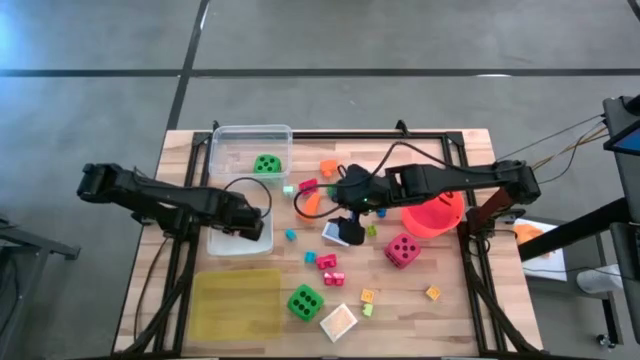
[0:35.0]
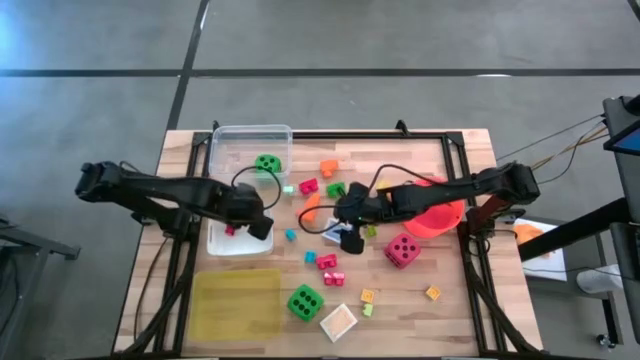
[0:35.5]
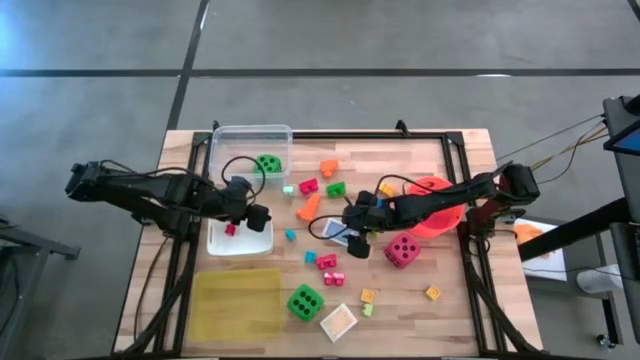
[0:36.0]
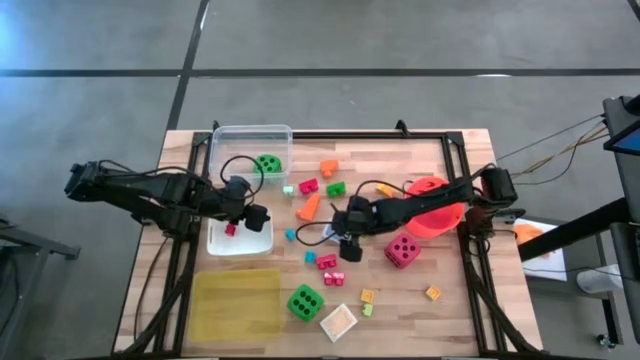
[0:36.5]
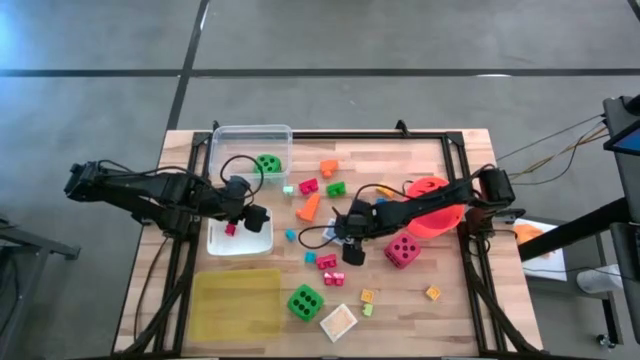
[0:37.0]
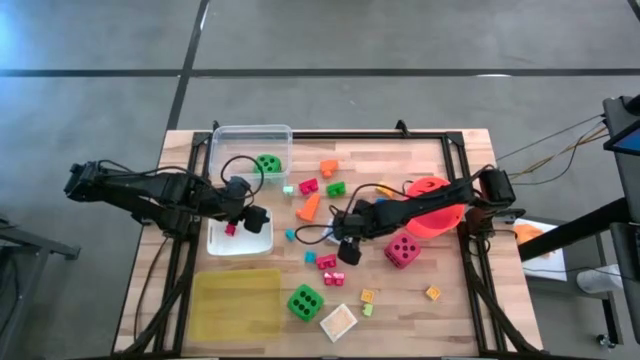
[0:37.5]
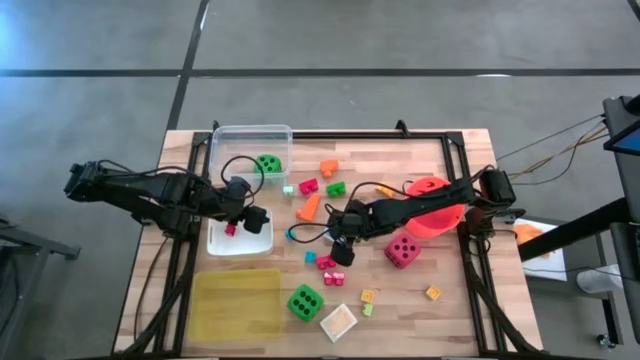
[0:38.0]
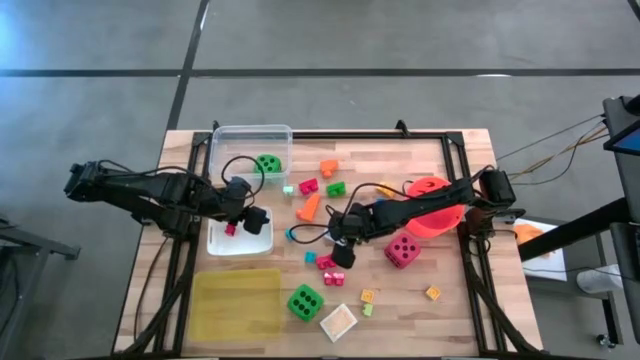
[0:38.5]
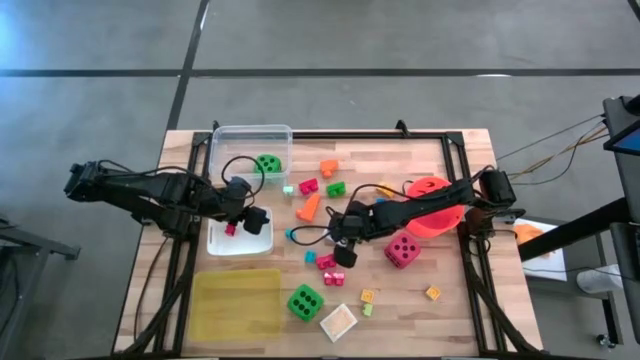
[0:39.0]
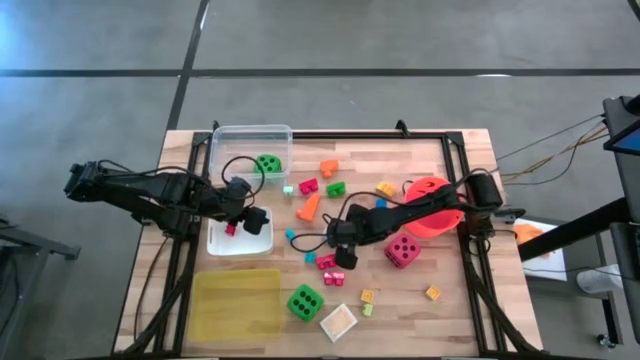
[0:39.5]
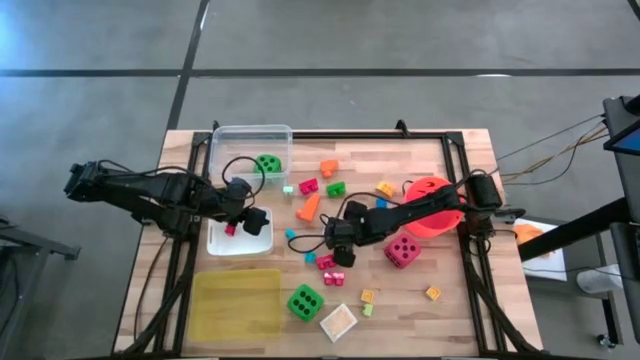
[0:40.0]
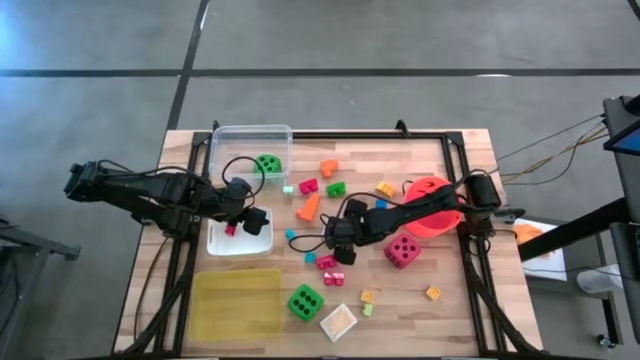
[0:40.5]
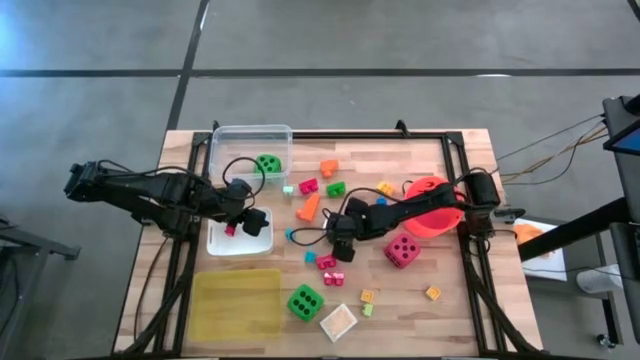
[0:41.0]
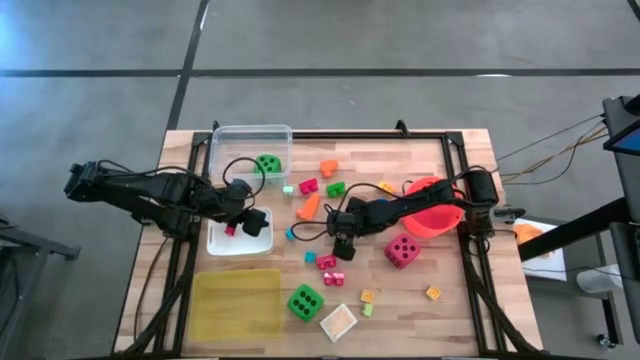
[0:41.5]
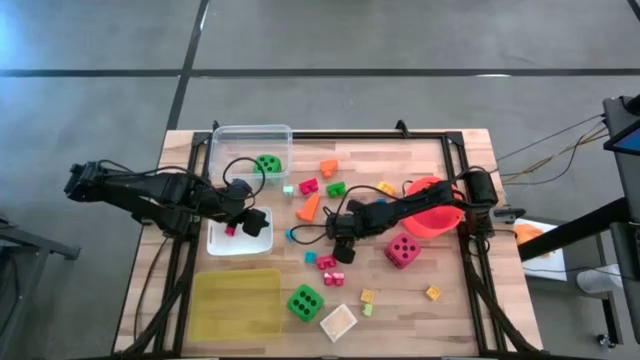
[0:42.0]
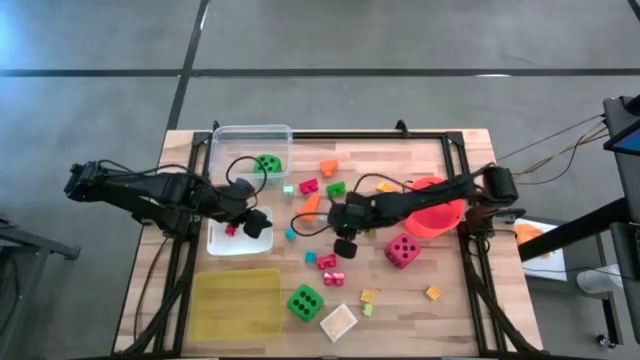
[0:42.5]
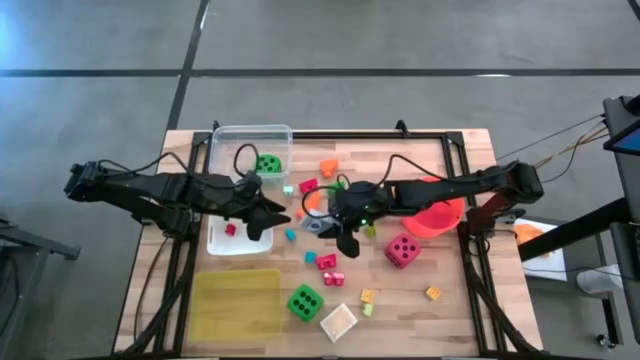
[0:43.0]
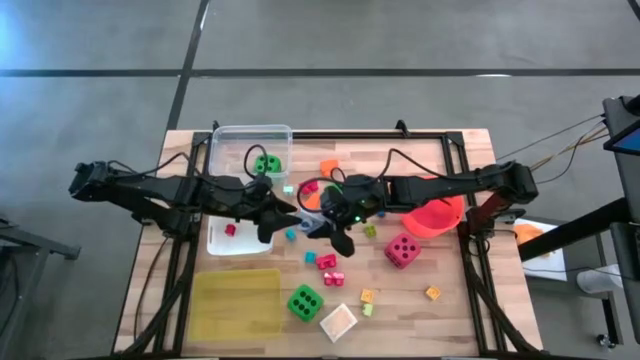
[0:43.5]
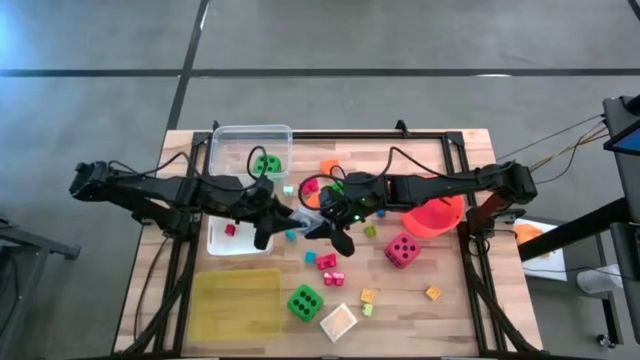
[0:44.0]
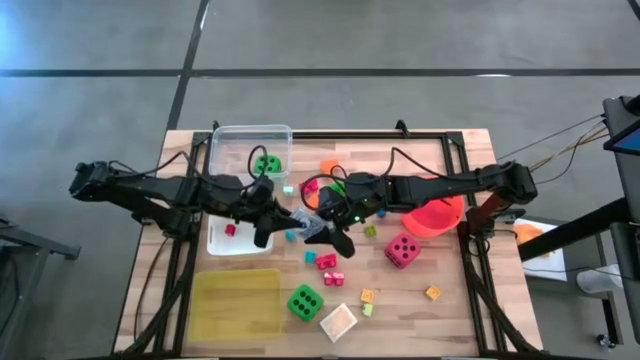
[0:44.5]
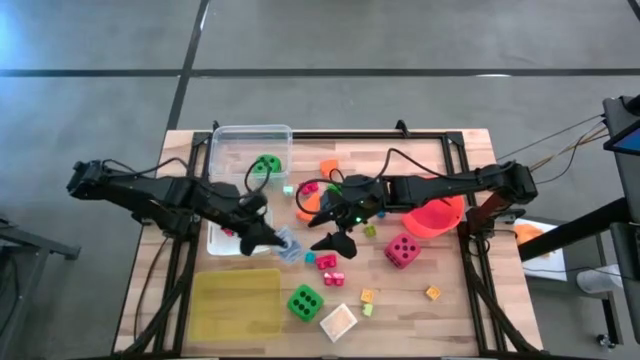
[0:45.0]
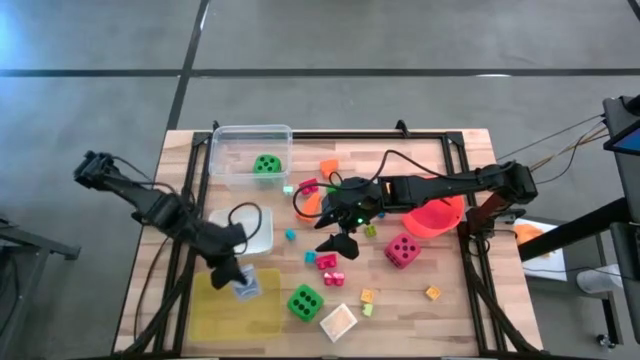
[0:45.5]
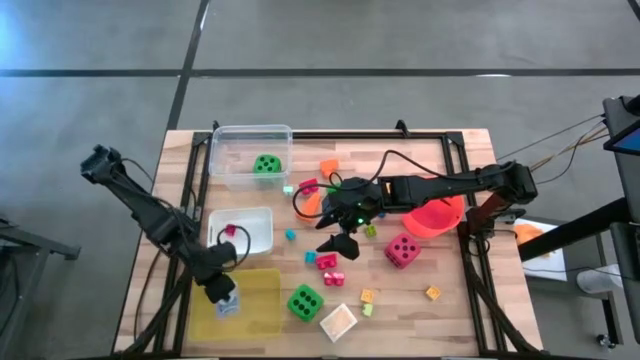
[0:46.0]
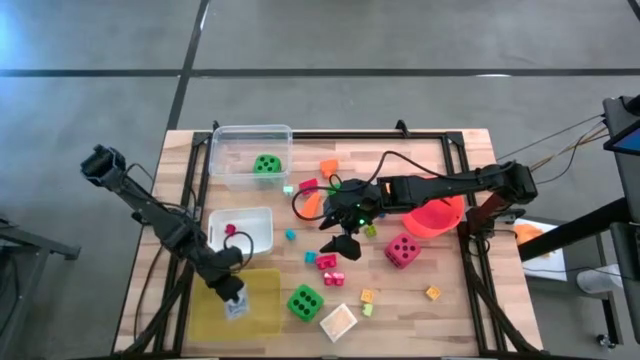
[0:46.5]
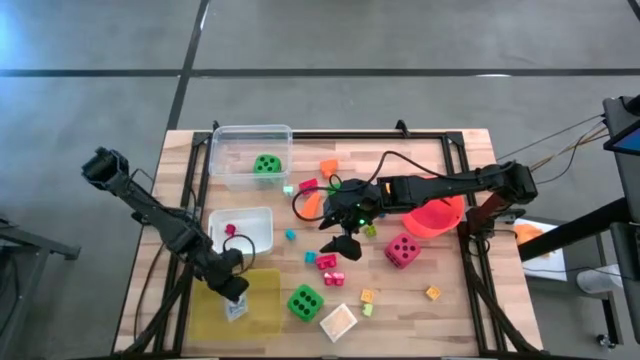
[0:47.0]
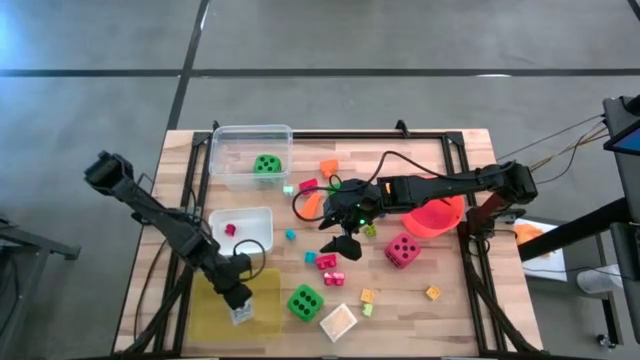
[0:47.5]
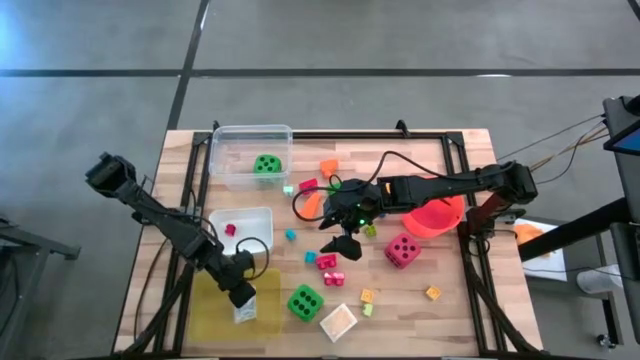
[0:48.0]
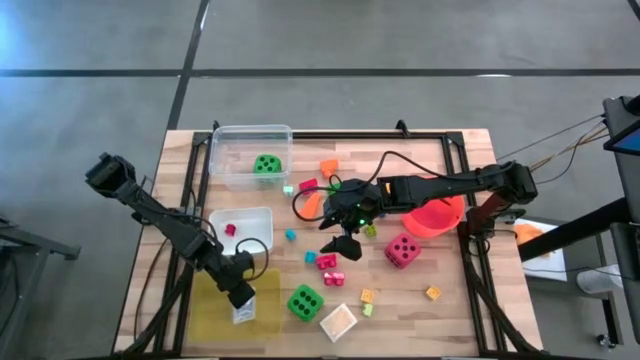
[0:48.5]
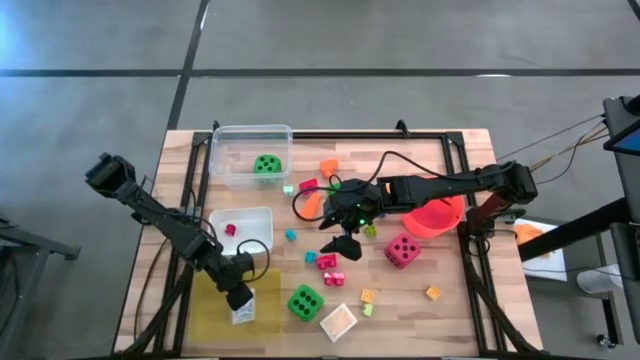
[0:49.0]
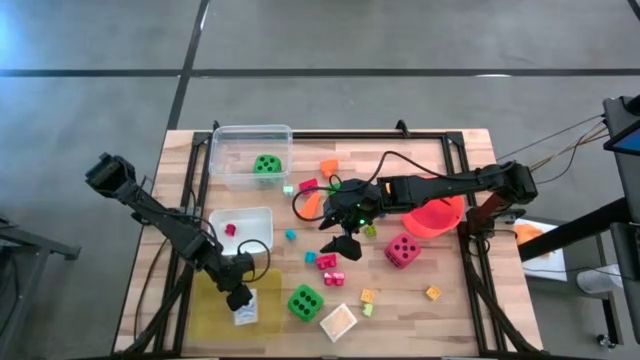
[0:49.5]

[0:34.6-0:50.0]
Task: Pick & Place Toys
Put the blue deck of cards into the yellow bin

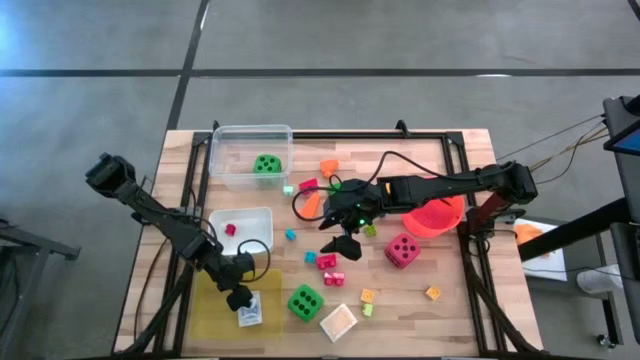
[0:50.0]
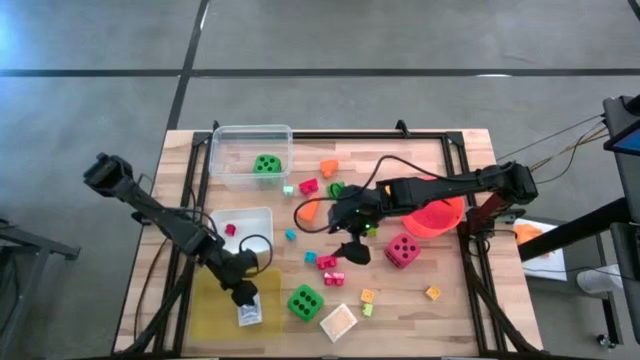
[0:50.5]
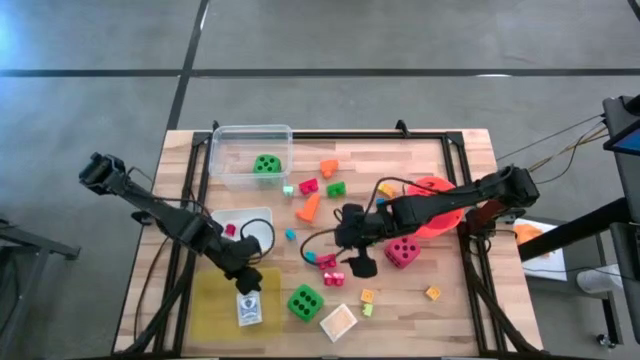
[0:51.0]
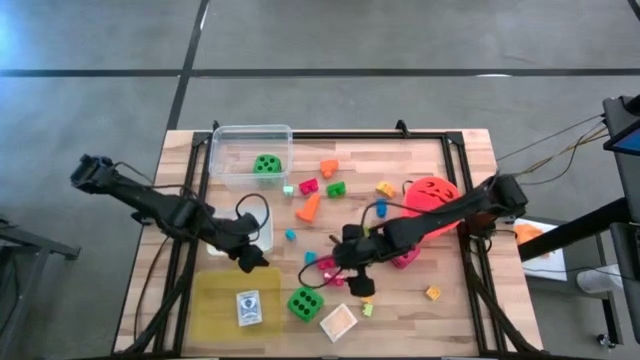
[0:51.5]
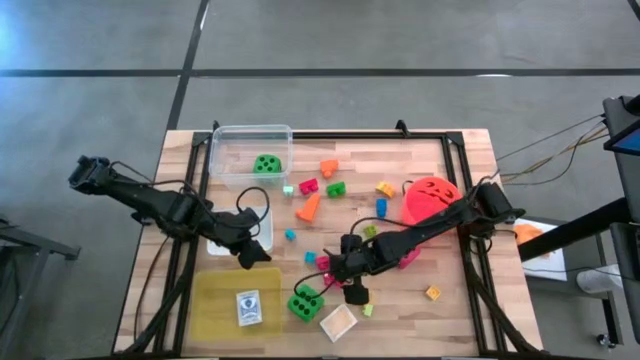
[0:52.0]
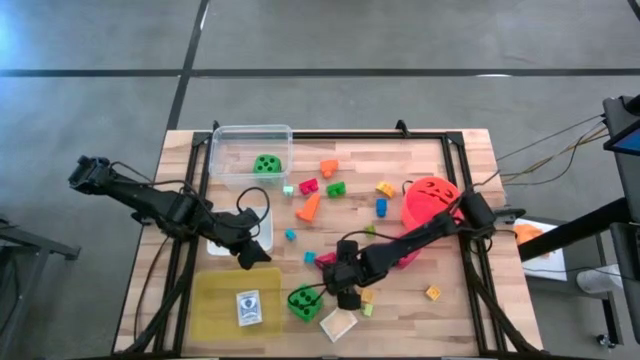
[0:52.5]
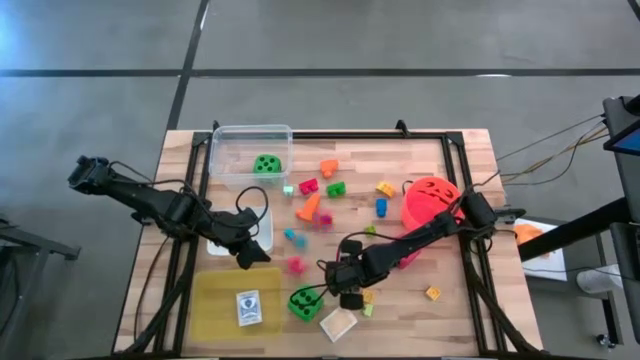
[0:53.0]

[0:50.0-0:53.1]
Put the red game piece into the white bin

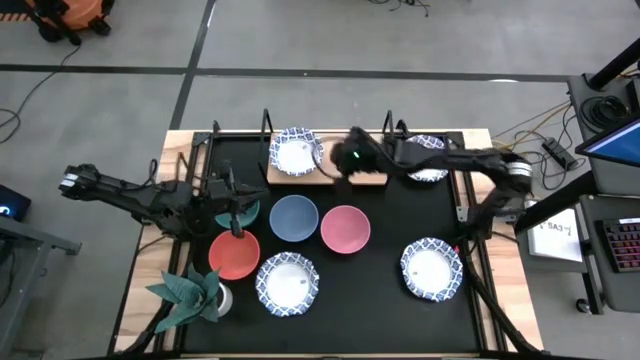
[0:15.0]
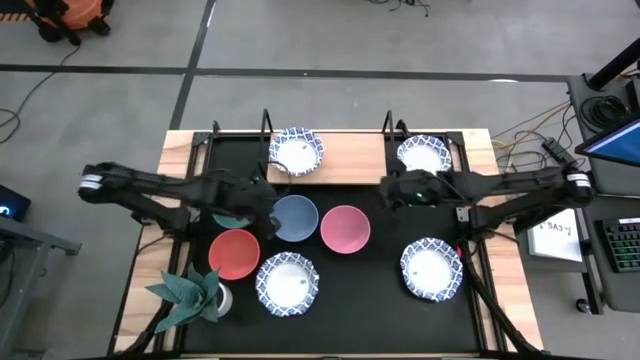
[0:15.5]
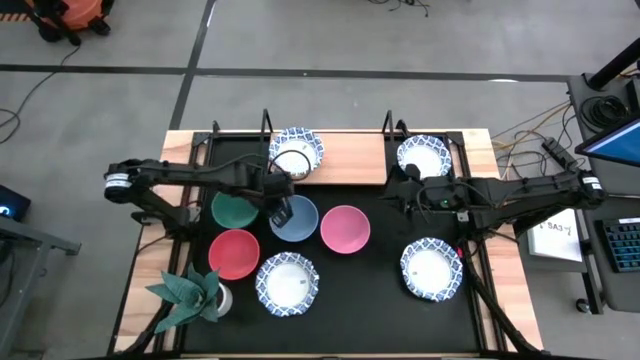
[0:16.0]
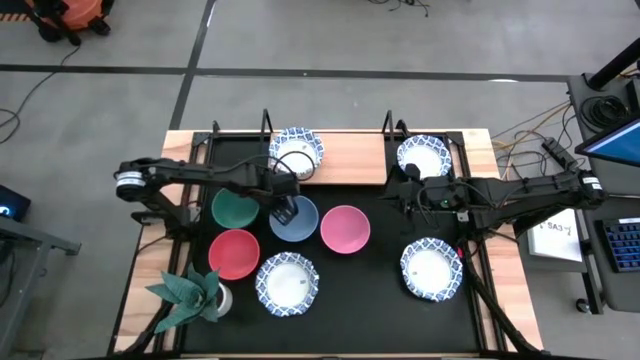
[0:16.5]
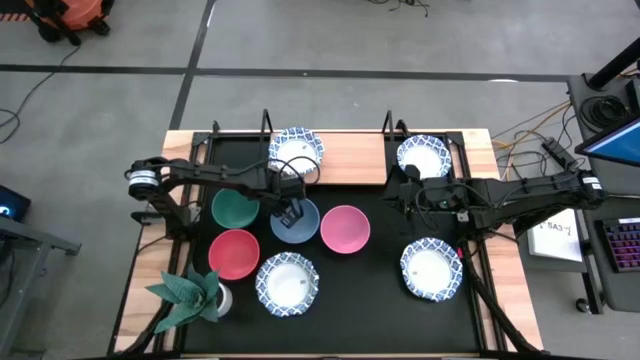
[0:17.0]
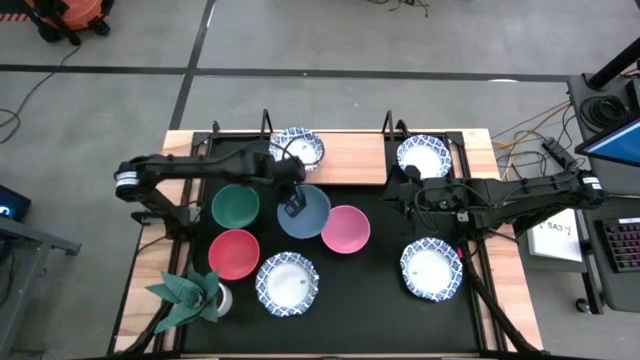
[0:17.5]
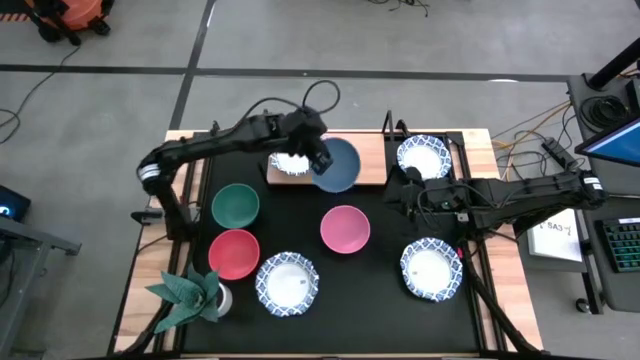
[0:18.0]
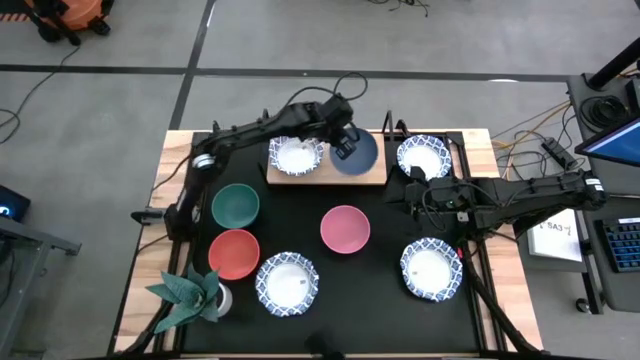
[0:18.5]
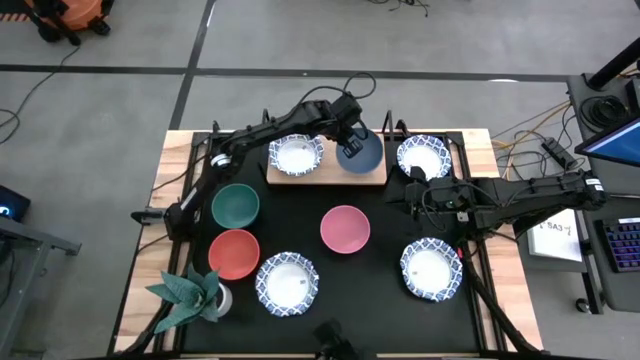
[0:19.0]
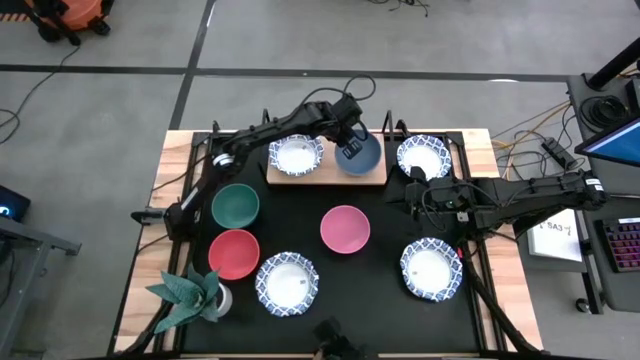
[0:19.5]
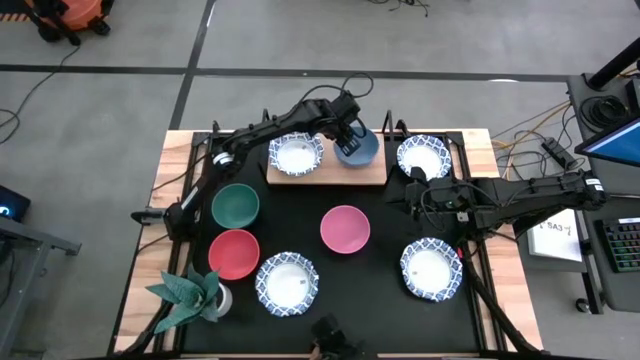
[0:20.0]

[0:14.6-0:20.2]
Task: Place and stack bowls onto a shelf
Put the blue bowl on the shelf
